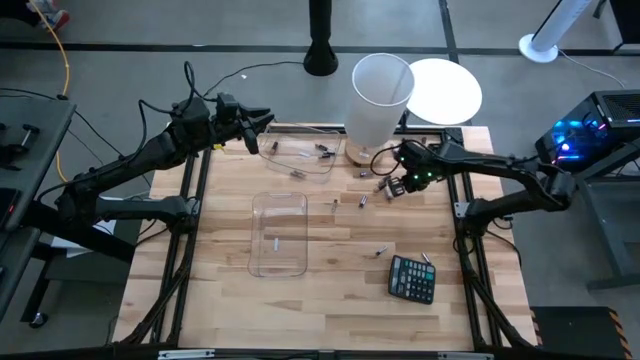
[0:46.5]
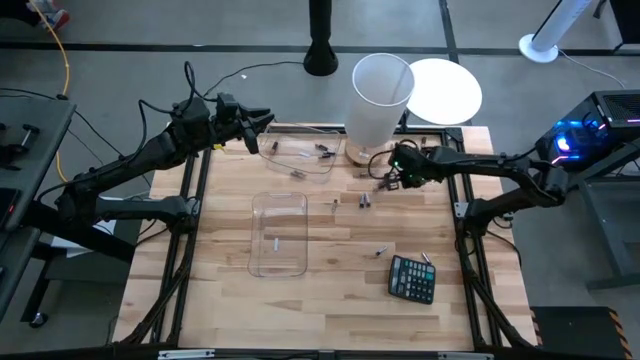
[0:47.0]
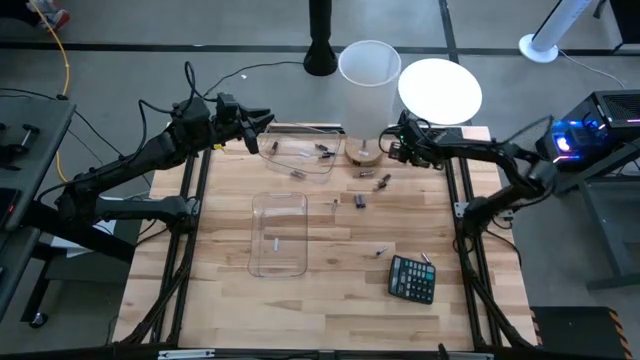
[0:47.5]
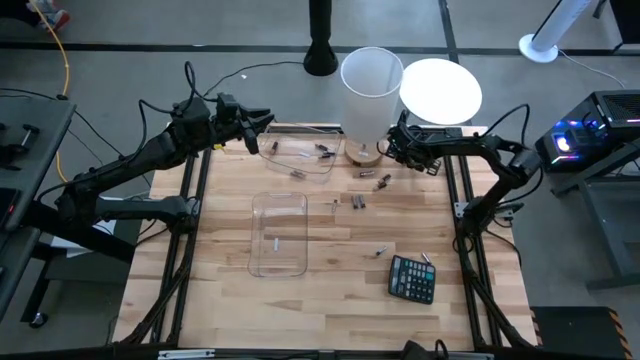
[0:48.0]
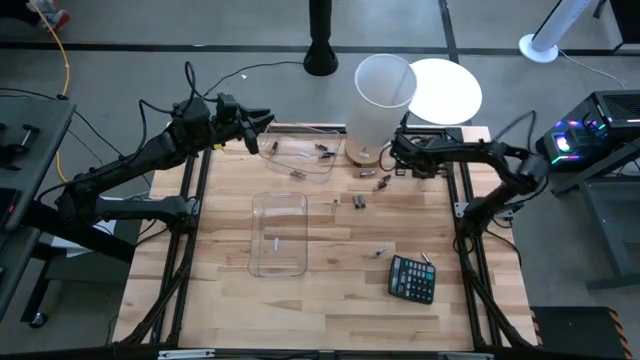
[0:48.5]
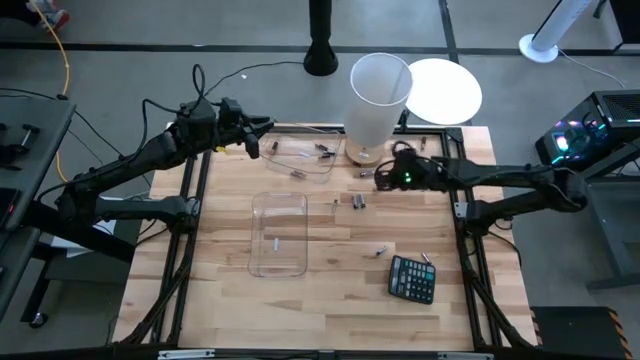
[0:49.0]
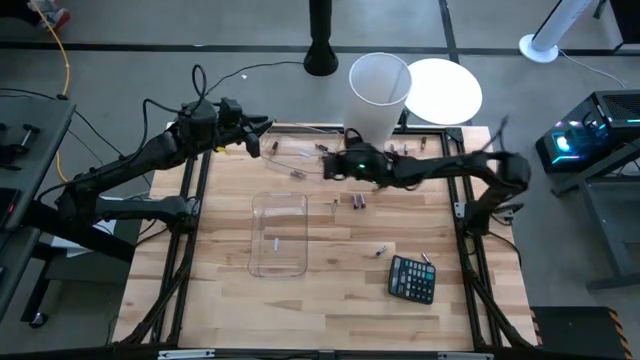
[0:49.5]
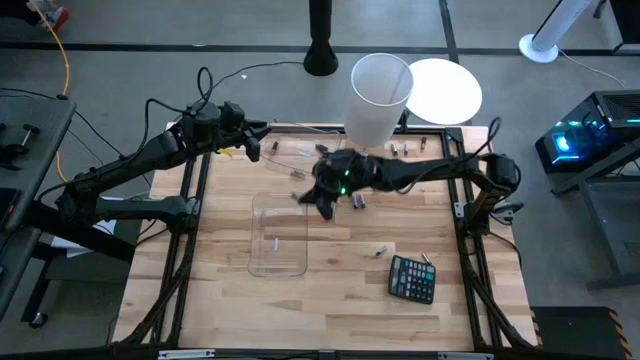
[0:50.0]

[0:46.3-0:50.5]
Task: Sort batteries
Put the white battery into the bottom transparent bin

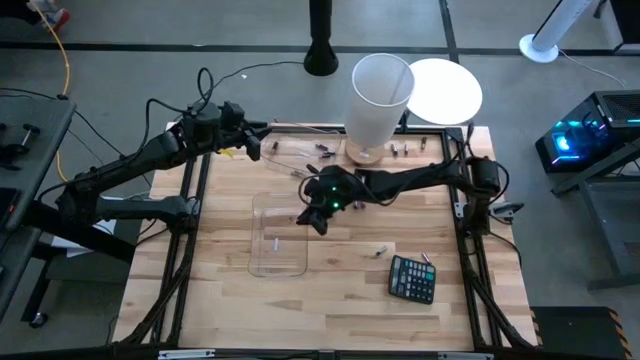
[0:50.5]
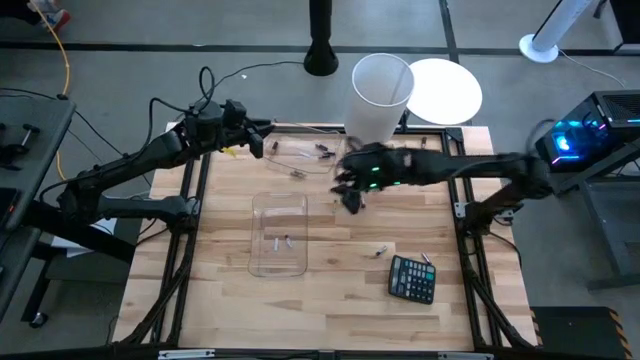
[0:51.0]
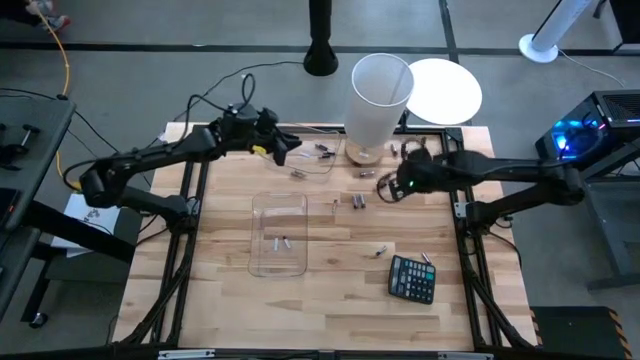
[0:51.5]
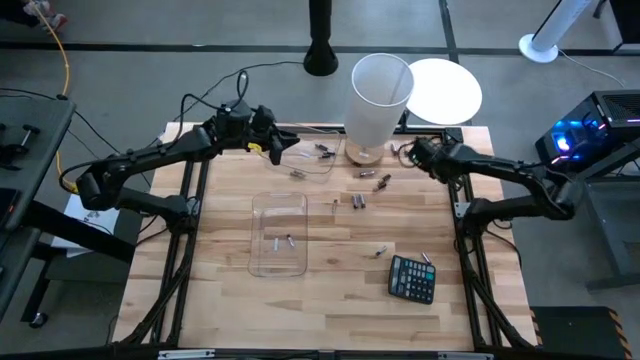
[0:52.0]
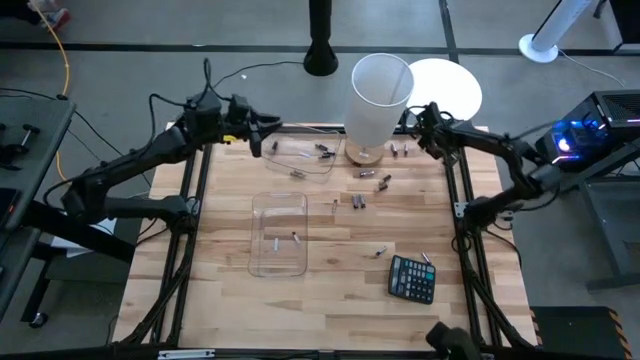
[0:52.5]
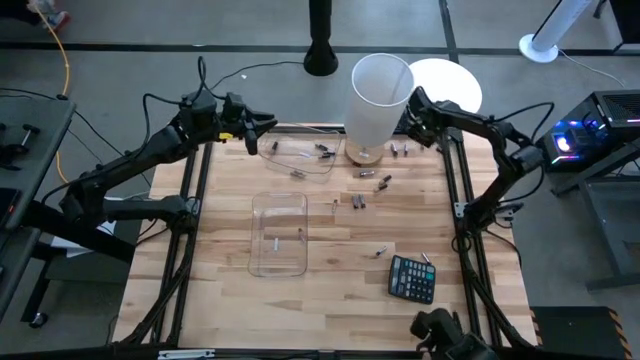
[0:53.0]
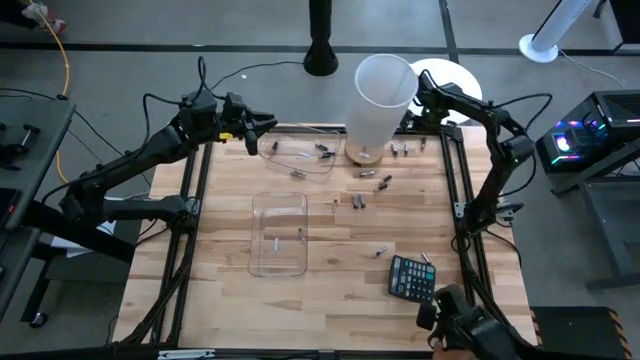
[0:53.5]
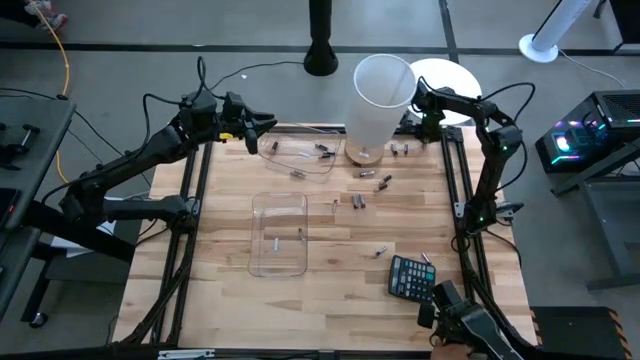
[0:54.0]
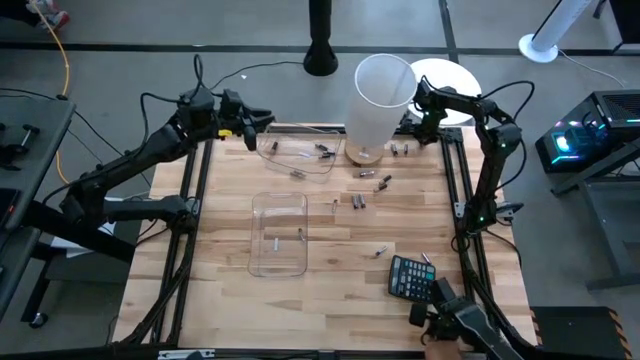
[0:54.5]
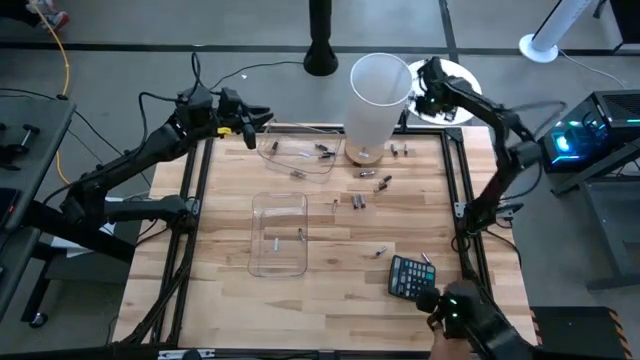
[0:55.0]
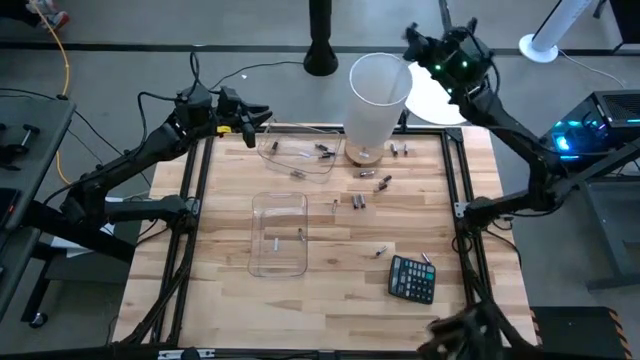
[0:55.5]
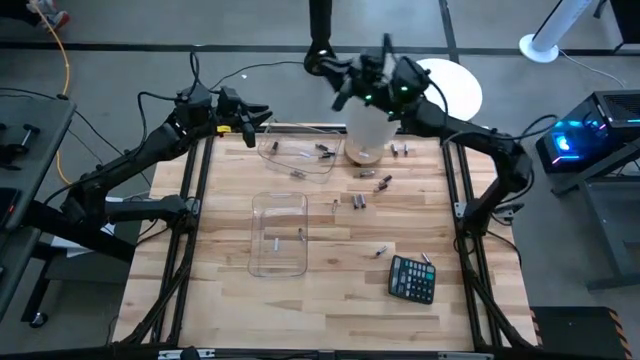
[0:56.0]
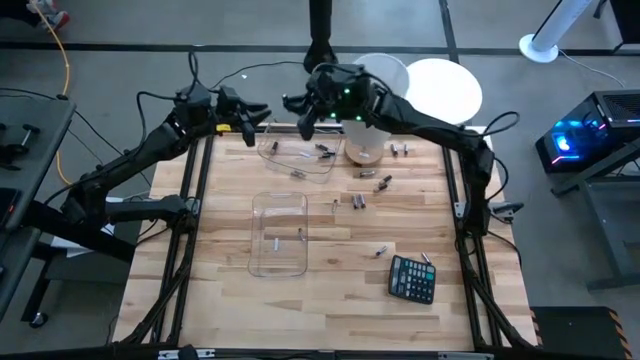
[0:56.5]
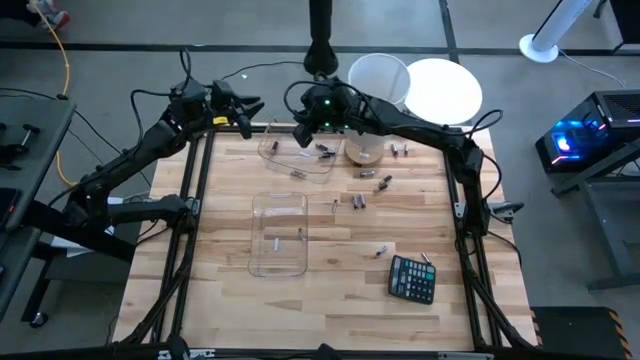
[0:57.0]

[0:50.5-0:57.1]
Put the black battery into the top transparent bin

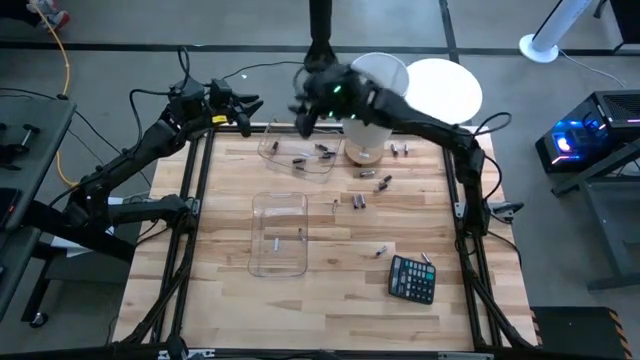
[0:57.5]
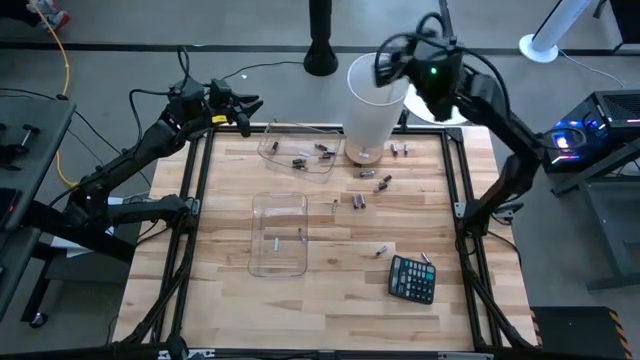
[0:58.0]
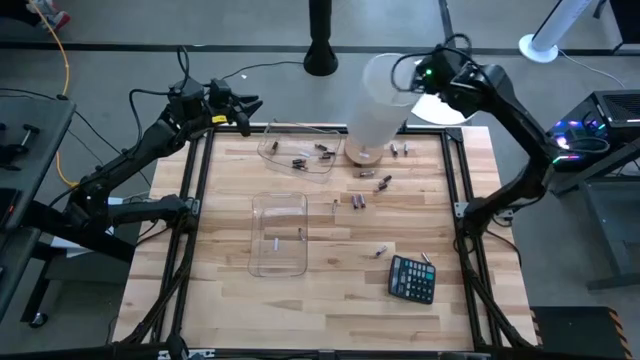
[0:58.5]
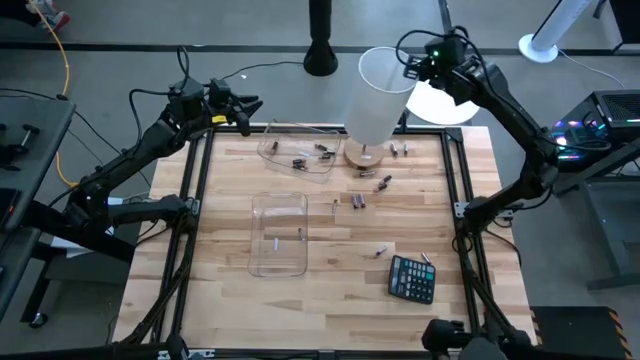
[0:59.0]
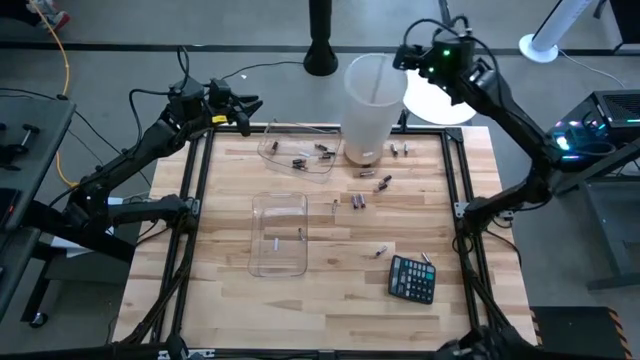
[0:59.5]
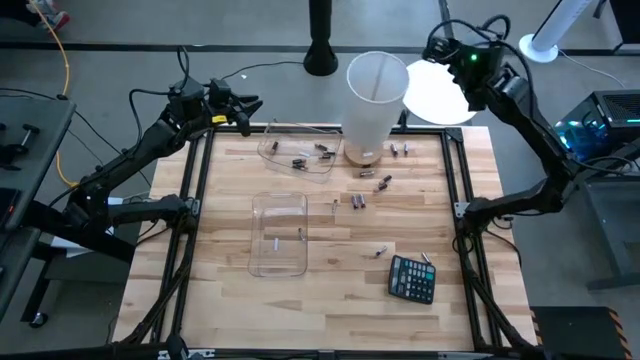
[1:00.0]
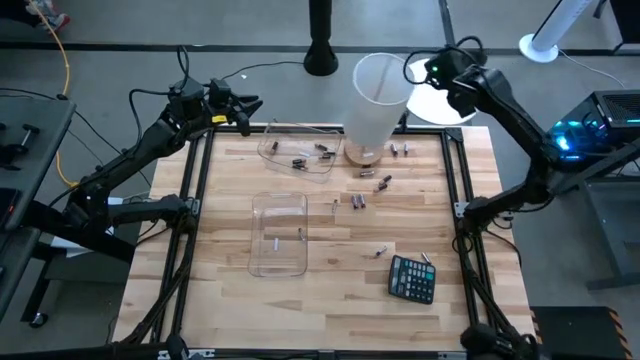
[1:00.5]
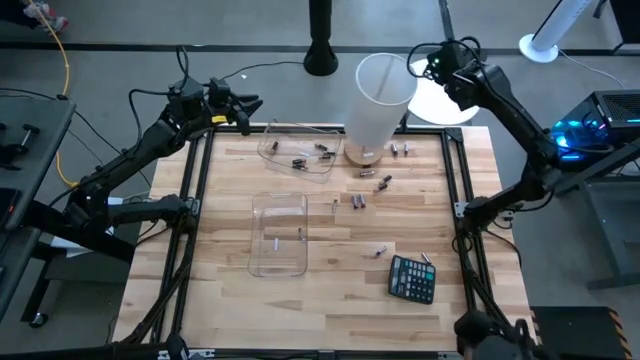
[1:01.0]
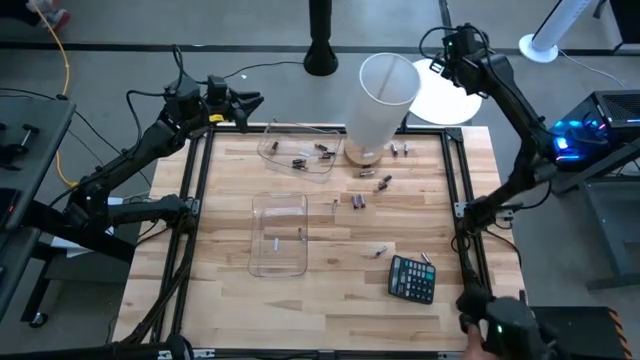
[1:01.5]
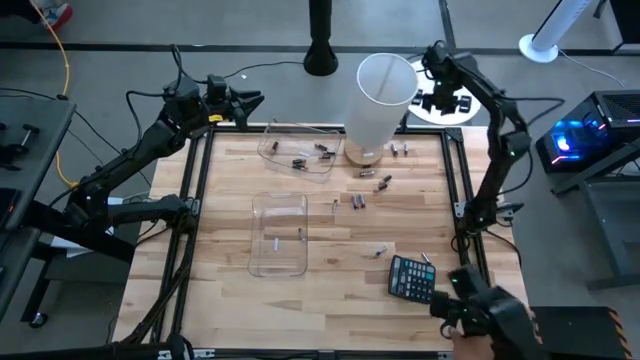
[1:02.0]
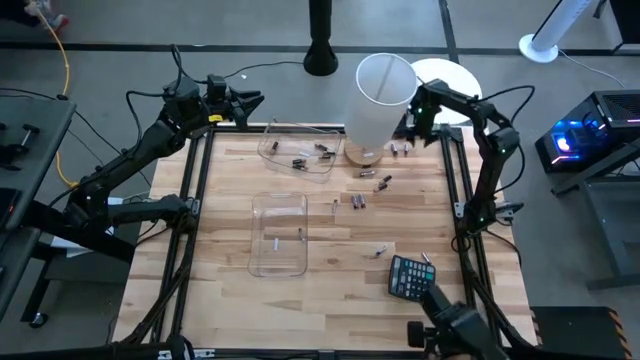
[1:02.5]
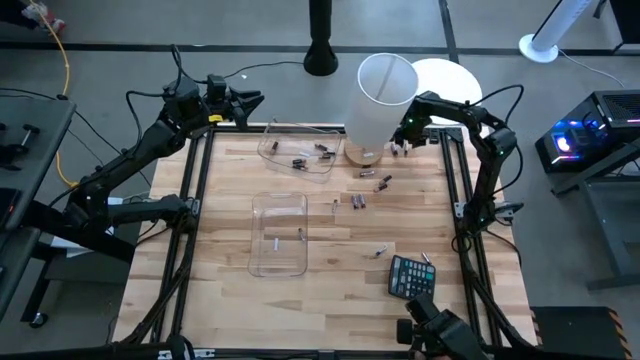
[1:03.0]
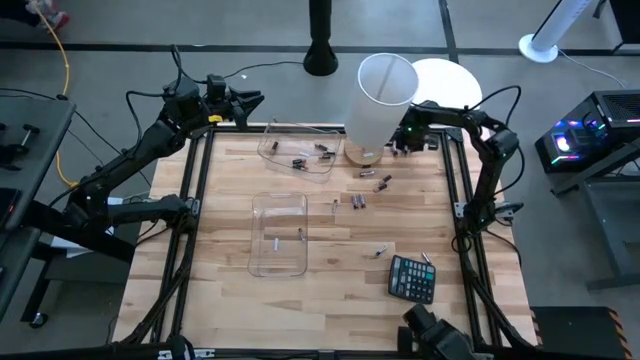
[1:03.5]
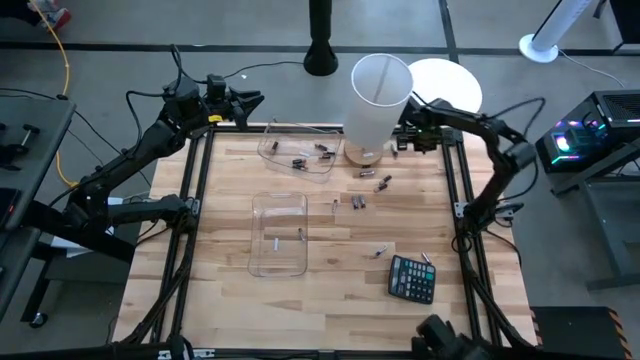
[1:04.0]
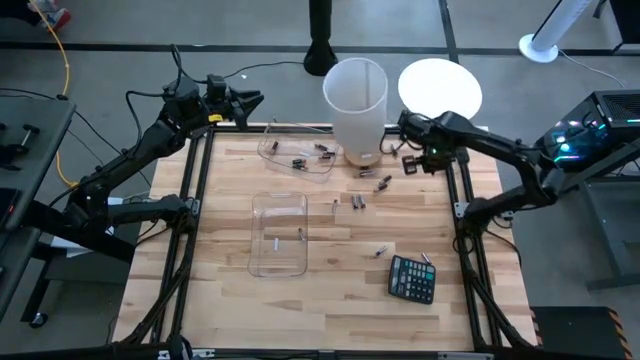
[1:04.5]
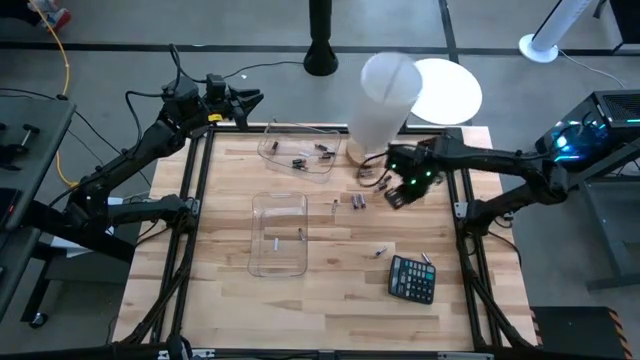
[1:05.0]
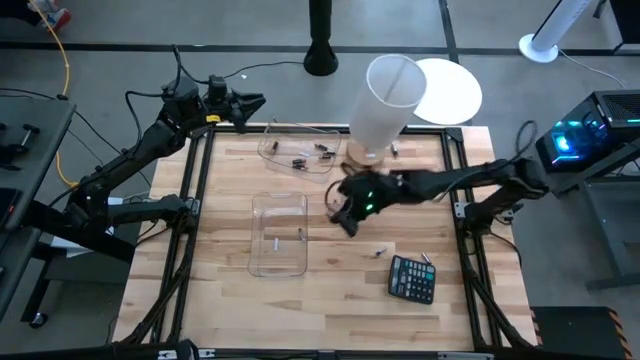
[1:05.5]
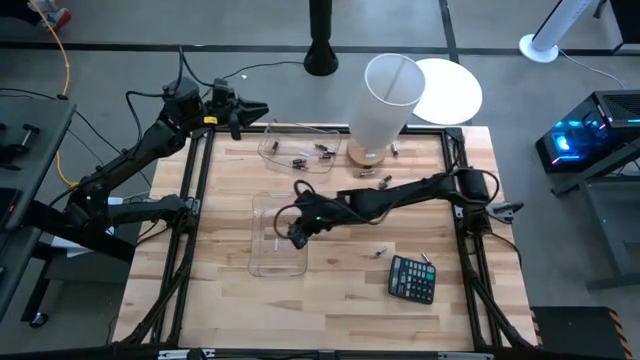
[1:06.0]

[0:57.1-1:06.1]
Put the white battery into the bottom transparent bin

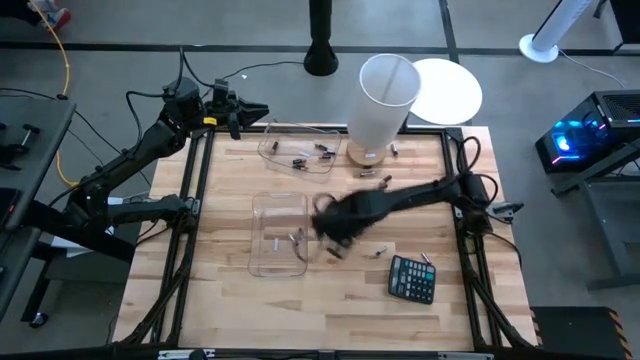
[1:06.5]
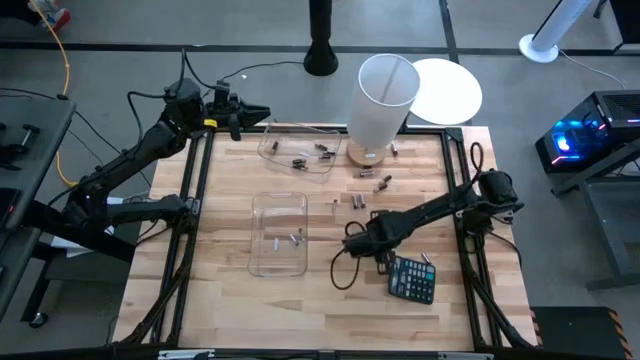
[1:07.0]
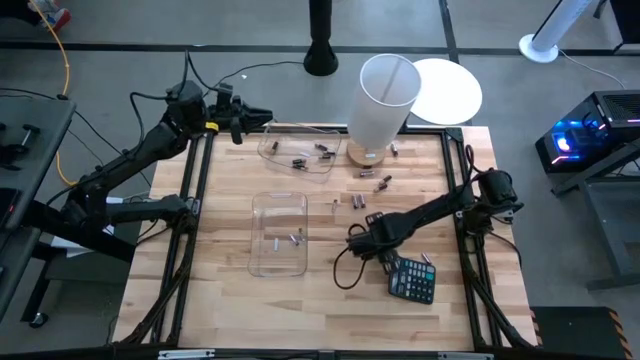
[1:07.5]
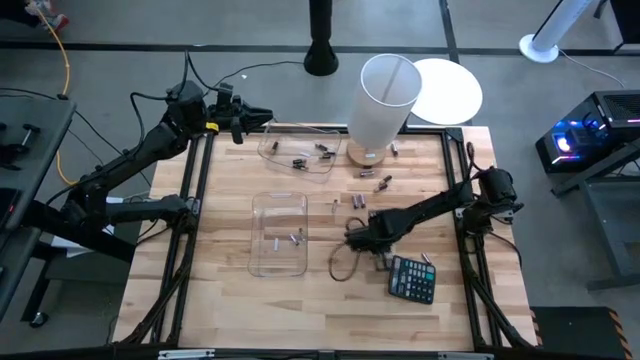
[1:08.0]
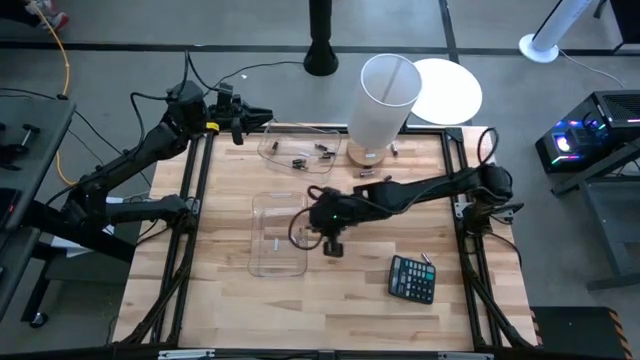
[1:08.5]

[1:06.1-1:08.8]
Put the white battery into the bottom transparent bin
